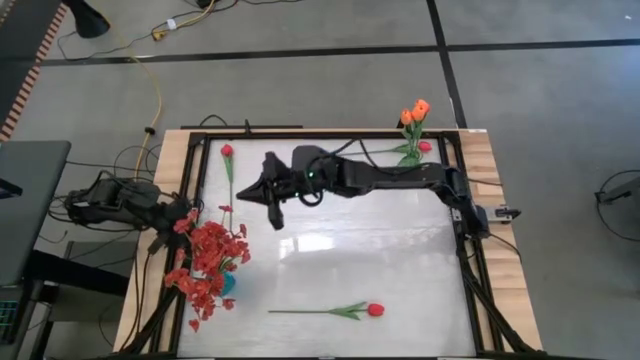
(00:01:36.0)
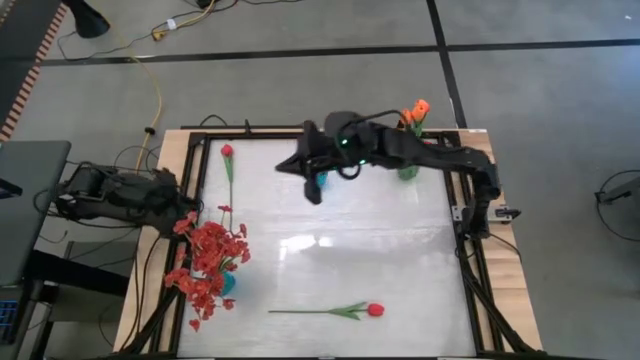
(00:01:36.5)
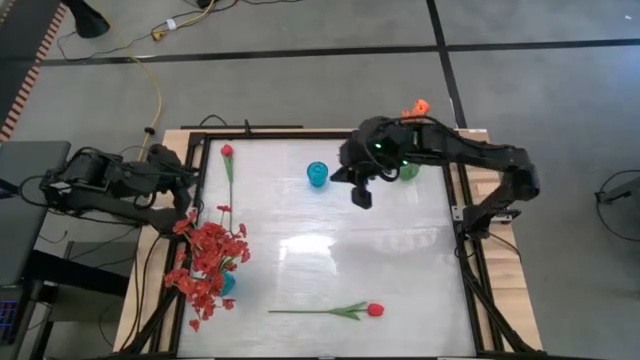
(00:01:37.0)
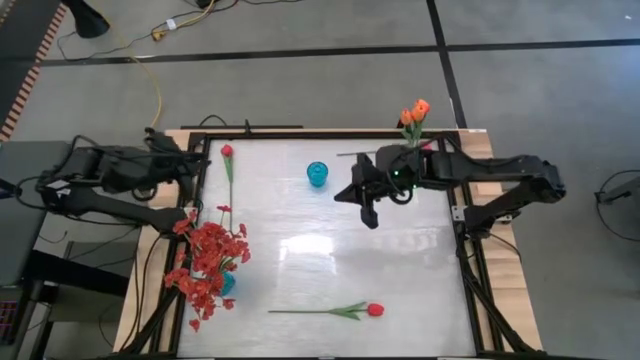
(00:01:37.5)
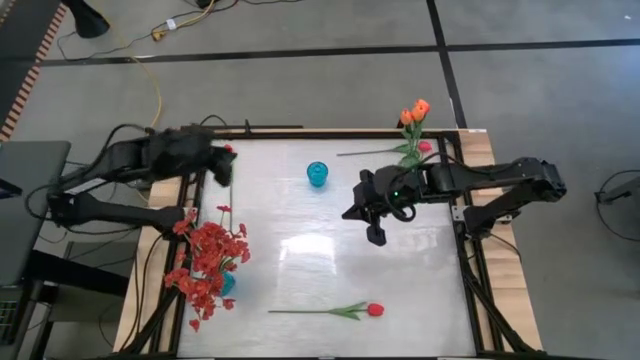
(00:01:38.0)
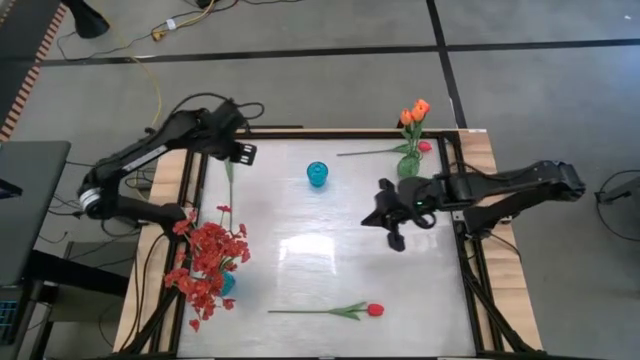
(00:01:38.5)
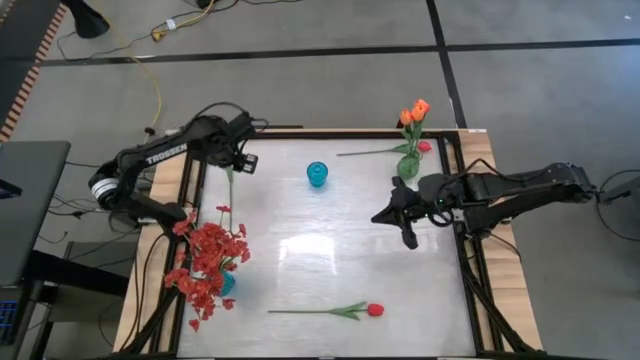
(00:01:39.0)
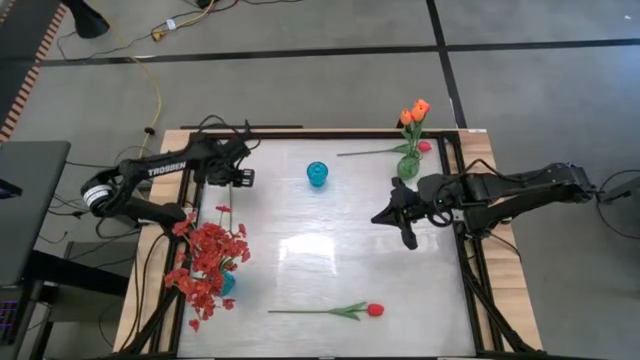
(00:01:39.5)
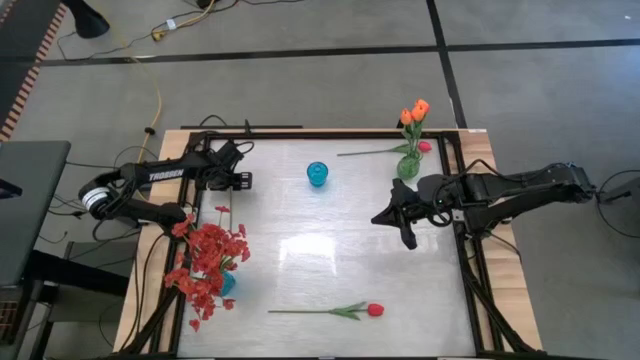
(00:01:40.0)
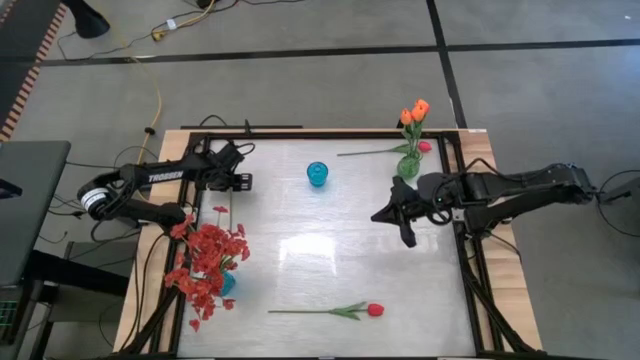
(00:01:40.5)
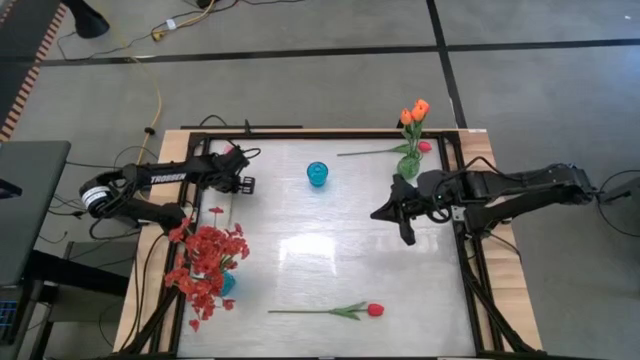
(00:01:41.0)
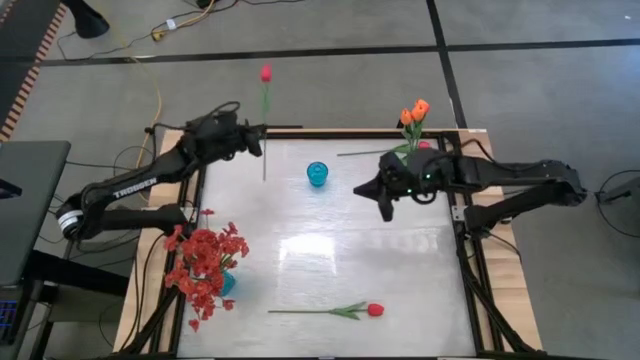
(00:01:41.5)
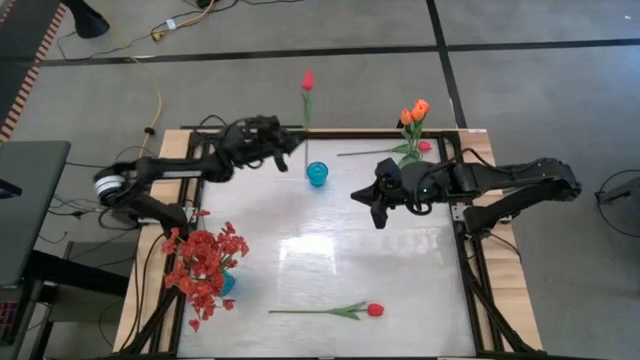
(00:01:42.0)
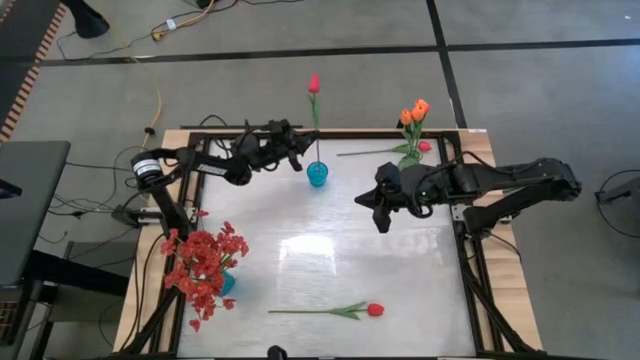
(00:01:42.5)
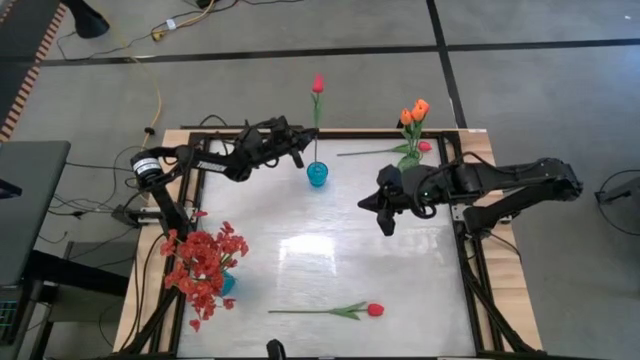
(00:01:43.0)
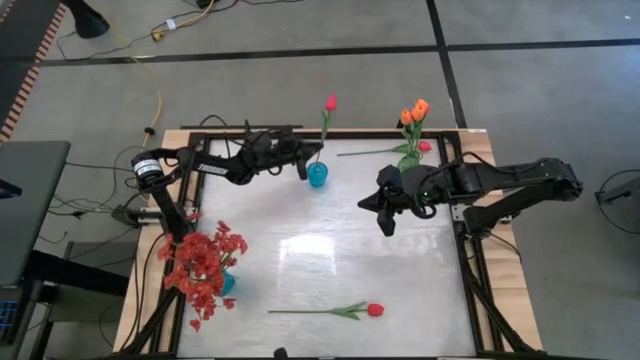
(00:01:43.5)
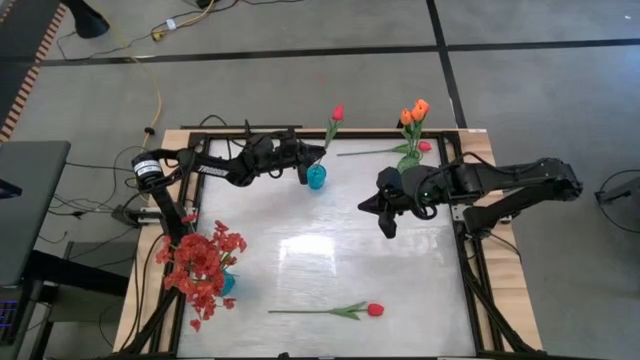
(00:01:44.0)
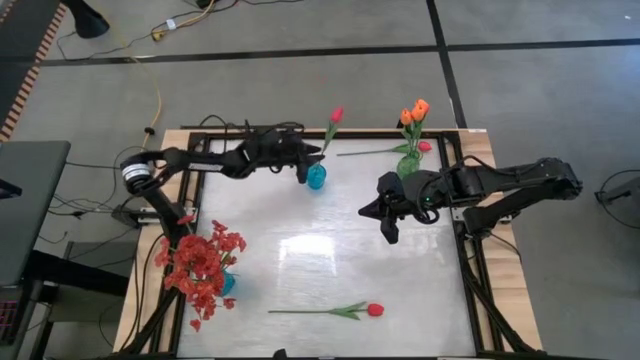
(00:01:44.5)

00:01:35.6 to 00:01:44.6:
Task: Sort flowers into vase by color
Put the top left red tulip into the top blue vase

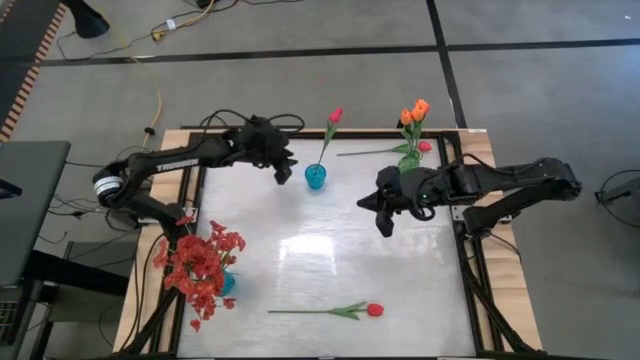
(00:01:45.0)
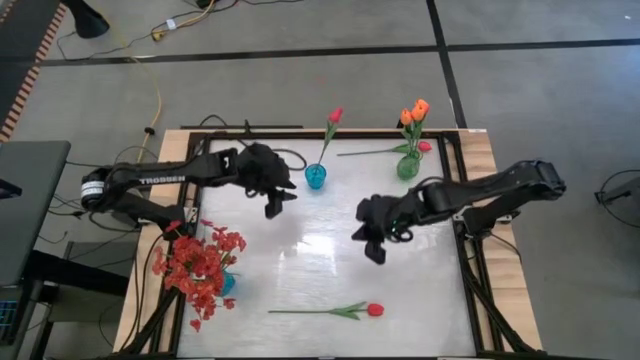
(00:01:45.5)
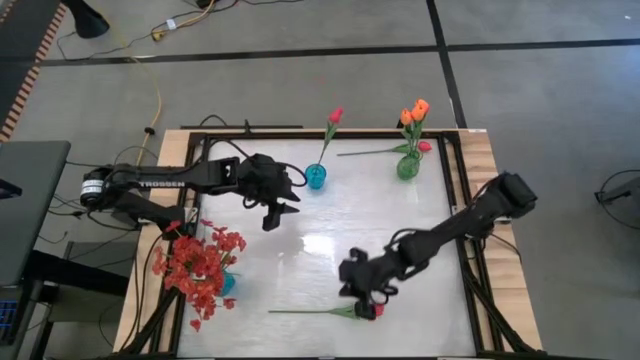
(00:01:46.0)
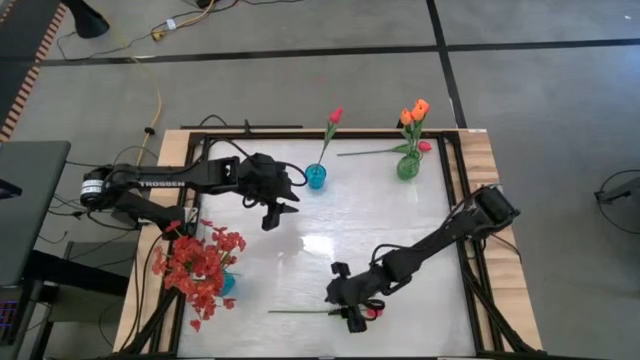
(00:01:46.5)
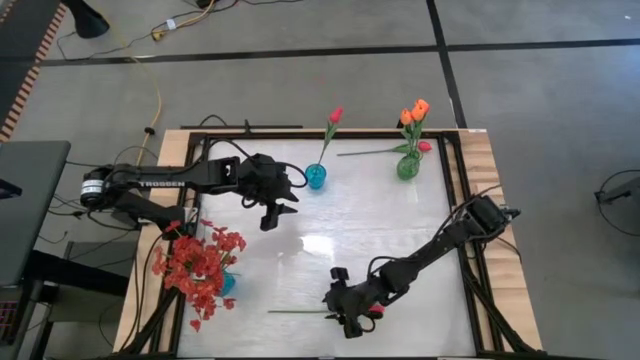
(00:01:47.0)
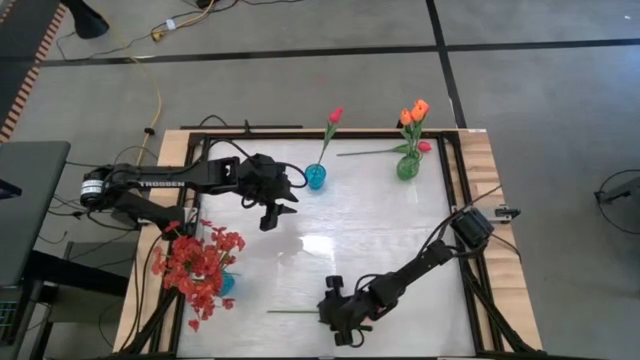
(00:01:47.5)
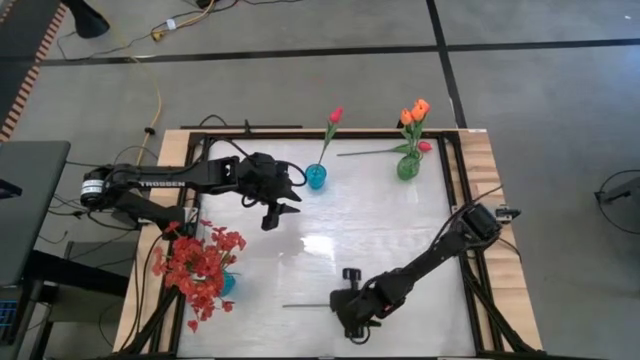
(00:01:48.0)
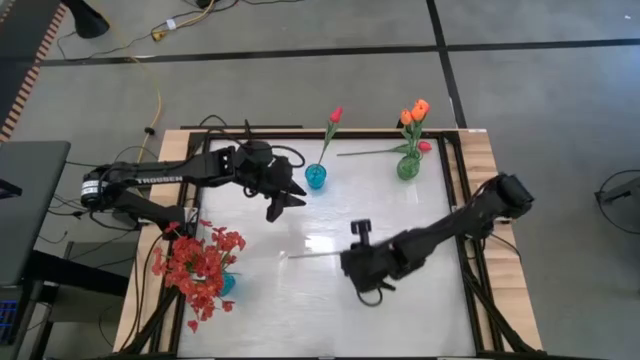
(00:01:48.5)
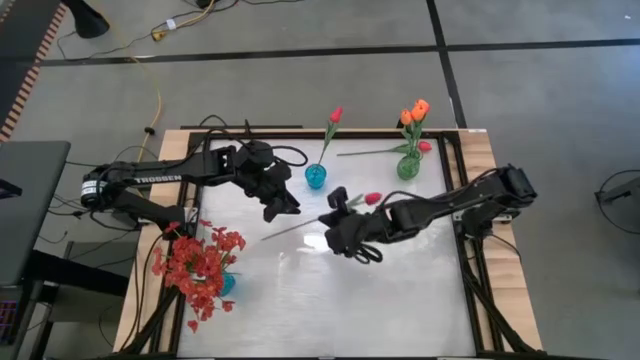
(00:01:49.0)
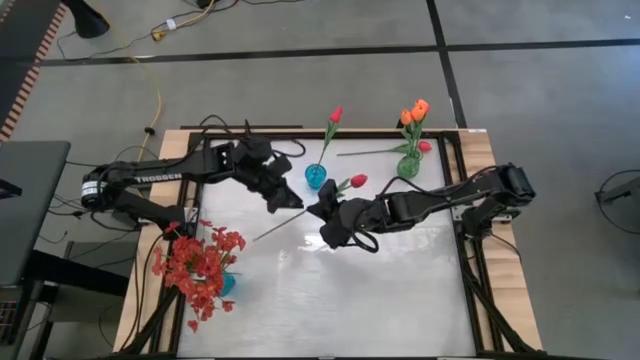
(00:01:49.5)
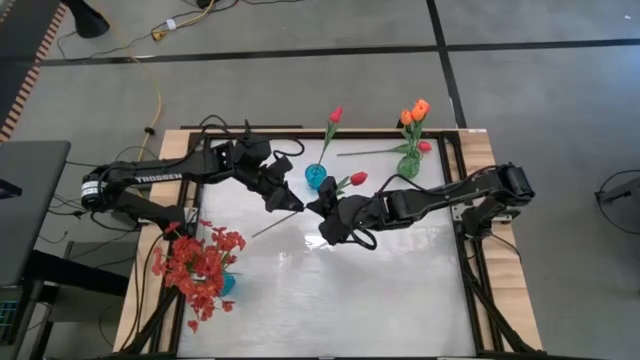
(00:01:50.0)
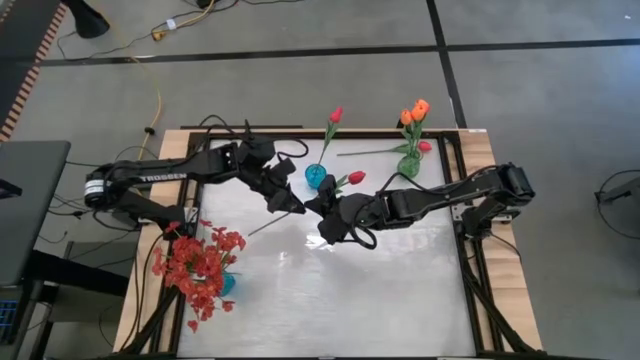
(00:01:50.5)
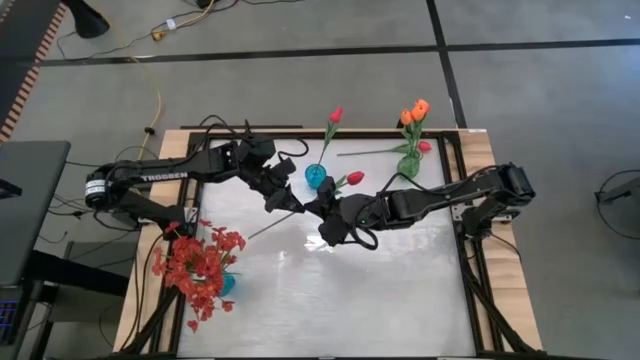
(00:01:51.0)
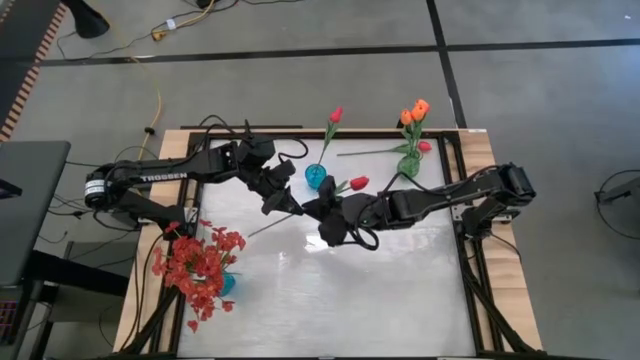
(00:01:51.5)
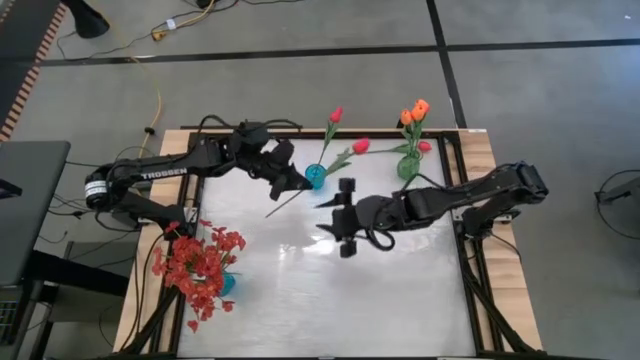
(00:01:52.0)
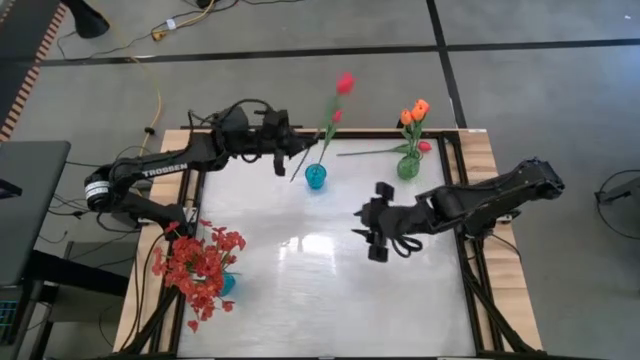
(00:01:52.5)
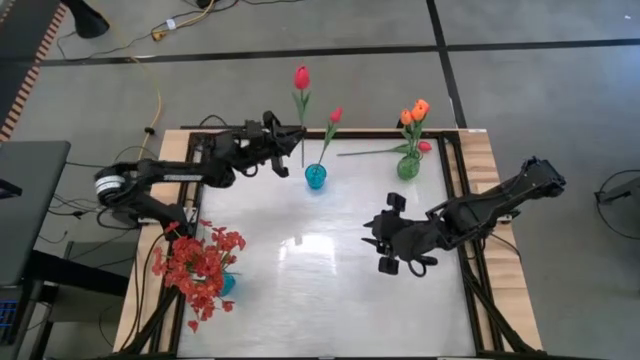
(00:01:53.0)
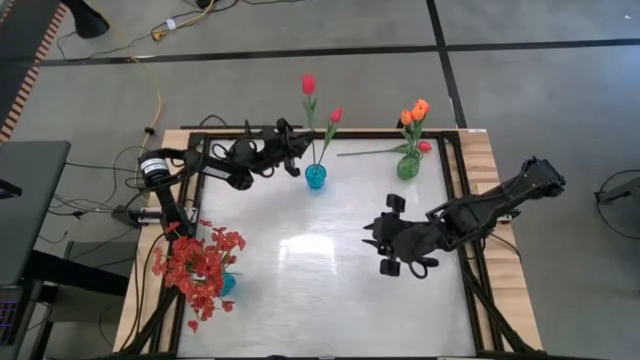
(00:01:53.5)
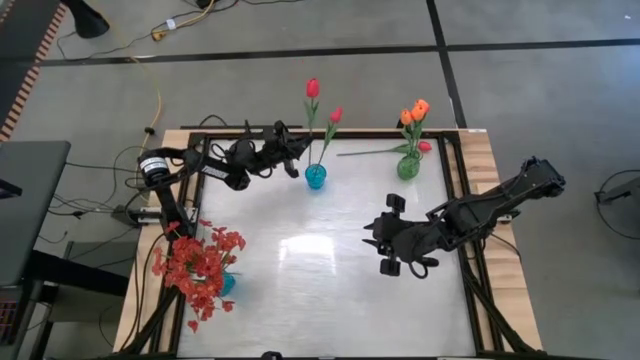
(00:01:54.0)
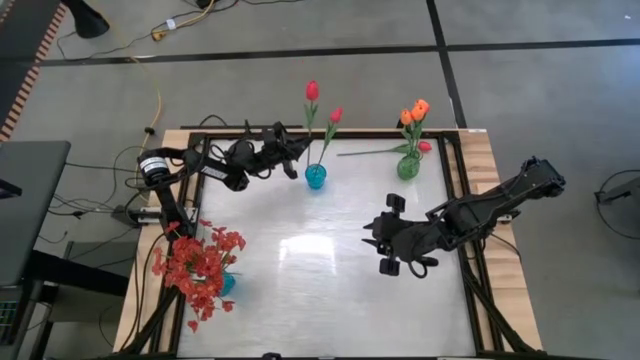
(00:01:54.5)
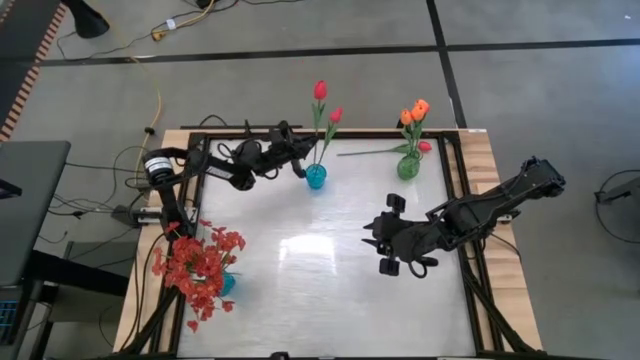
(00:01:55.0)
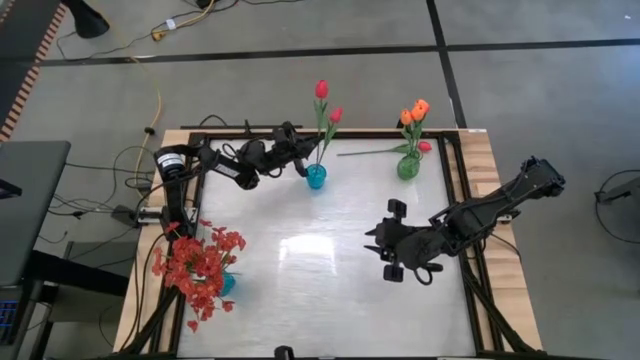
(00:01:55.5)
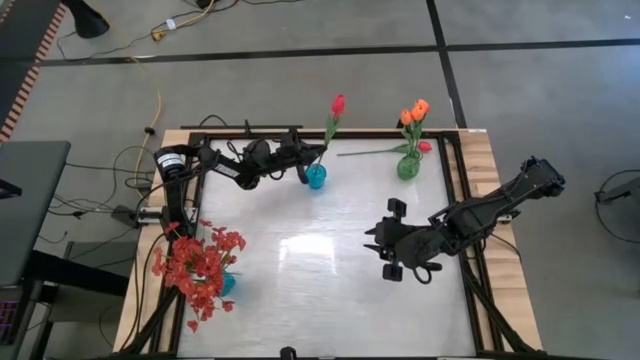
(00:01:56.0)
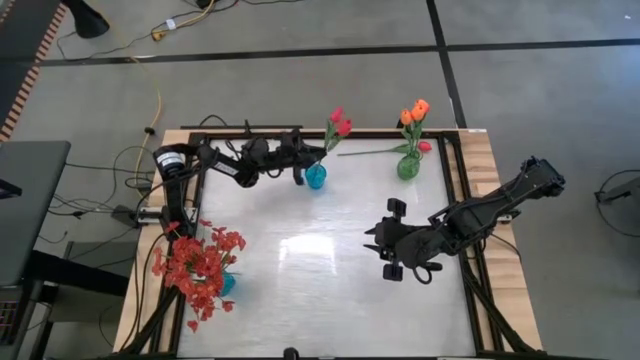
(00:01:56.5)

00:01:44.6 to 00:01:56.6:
Put the bottom red tulip into the top blue vase
